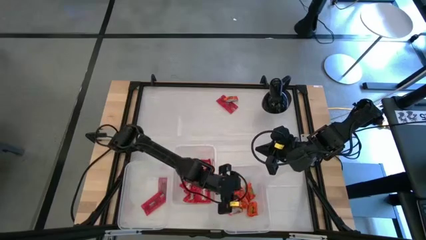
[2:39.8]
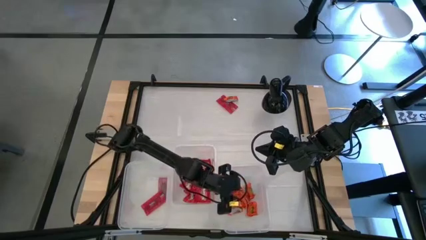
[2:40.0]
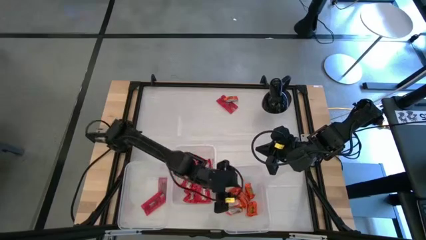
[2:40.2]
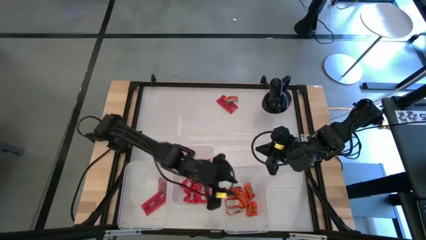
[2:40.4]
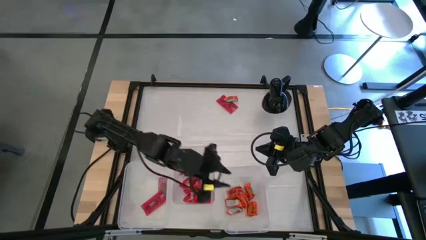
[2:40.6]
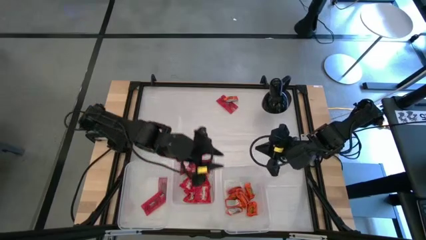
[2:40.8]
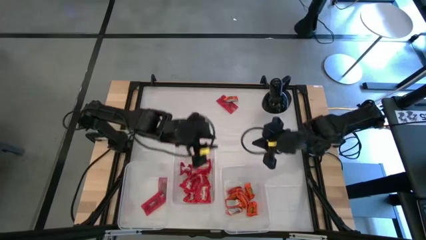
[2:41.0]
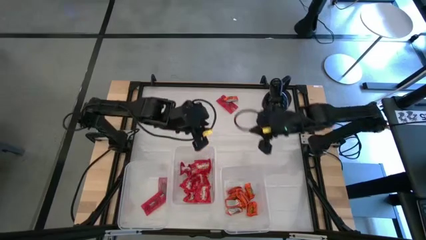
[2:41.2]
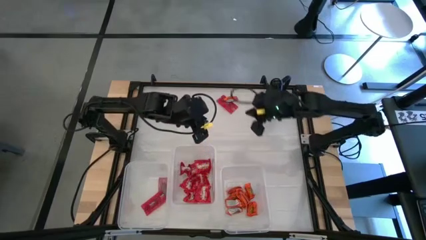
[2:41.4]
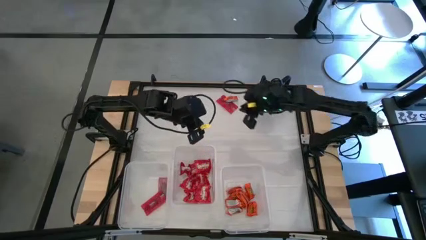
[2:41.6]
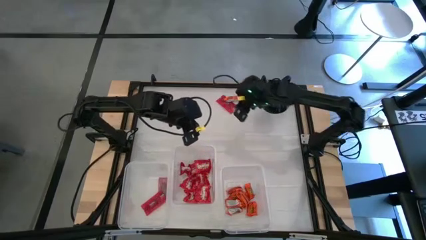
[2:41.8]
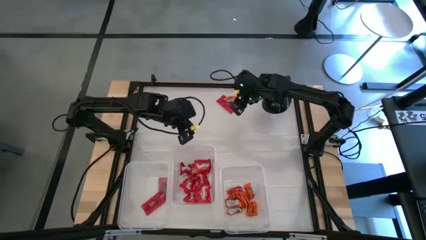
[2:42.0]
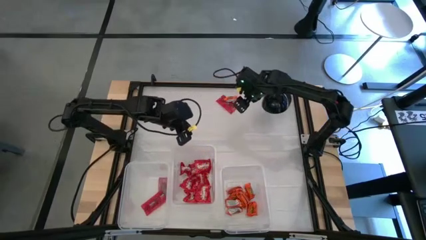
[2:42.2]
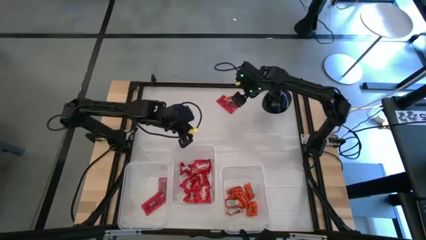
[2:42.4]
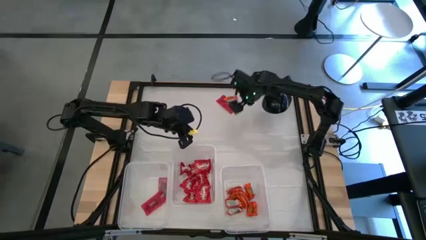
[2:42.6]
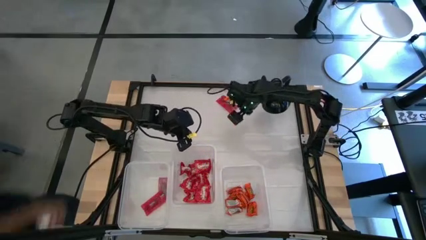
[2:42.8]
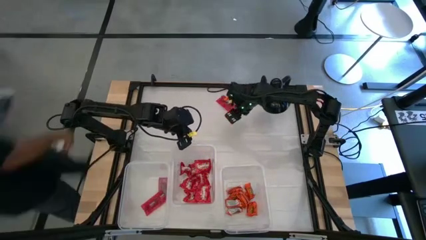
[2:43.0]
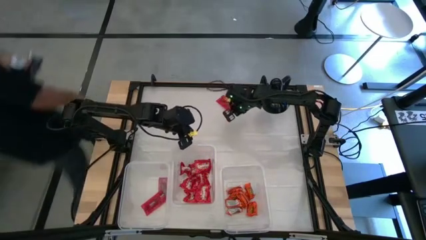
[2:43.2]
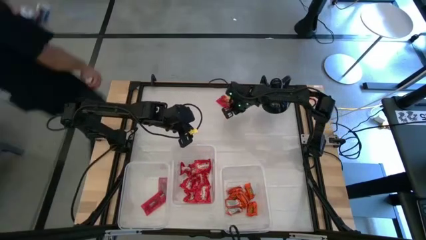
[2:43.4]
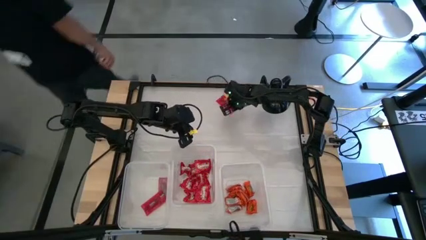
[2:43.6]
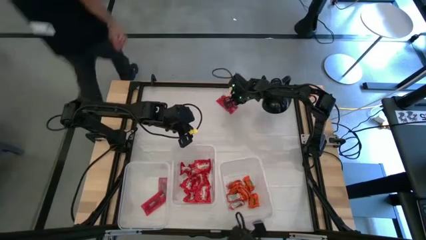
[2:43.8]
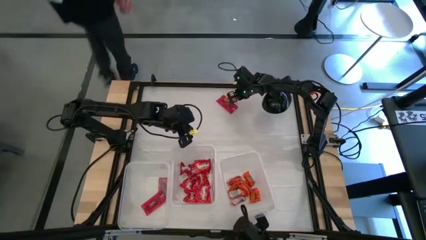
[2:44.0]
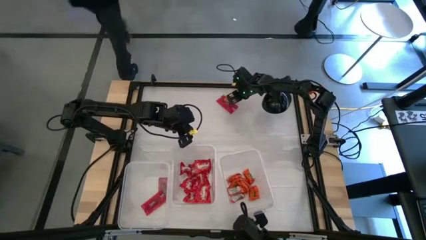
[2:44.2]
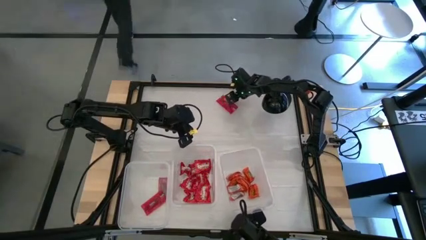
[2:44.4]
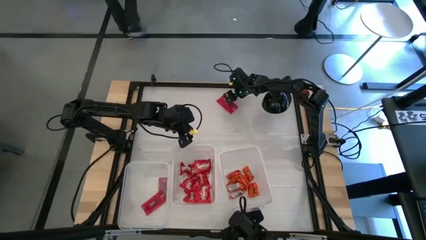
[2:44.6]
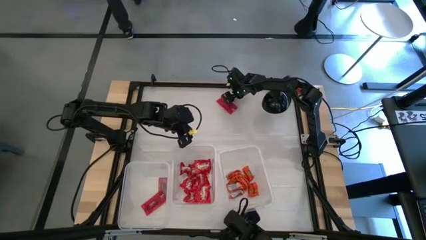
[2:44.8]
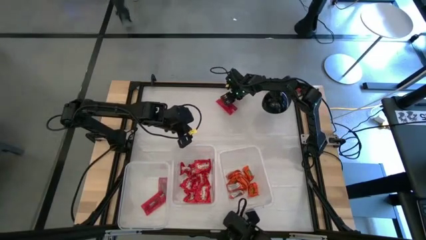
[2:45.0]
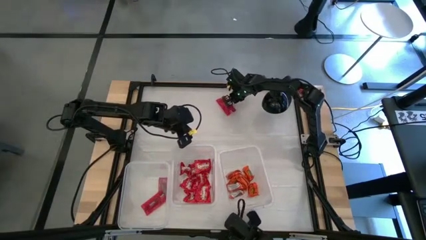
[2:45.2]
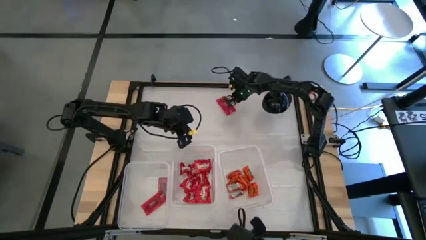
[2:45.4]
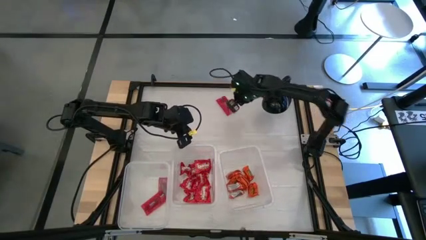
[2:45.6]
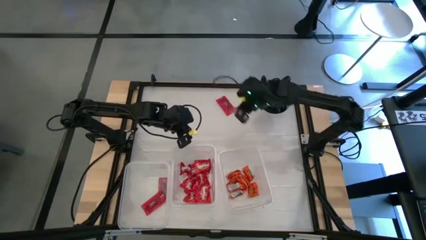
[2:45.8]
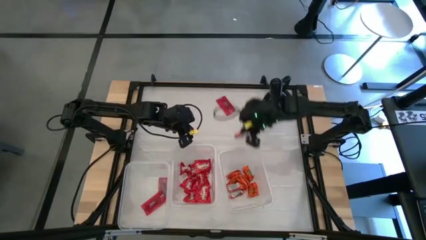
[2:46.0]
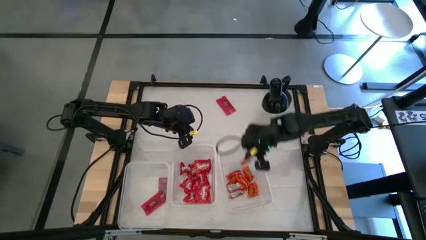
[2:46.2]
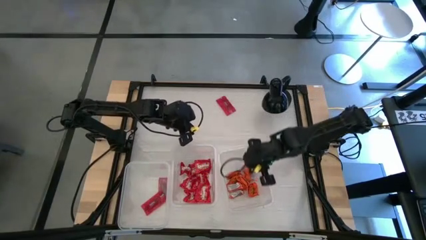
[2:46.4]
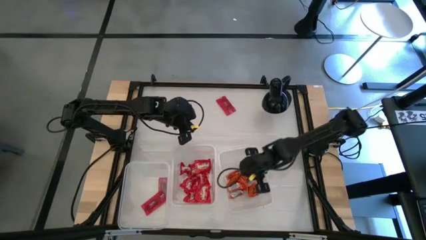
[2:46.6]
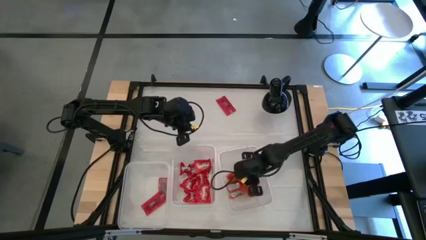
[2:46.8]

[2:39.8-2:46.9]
Task: Sort candy
Put the orange candy into the right transparent bin

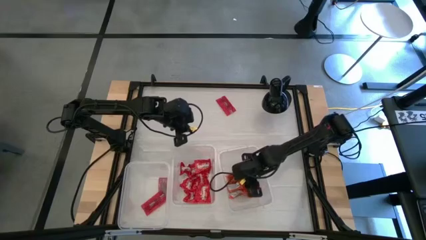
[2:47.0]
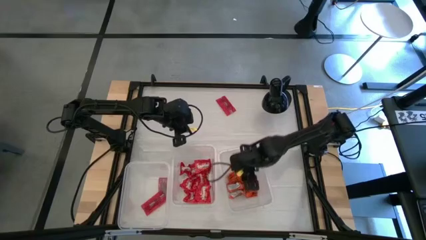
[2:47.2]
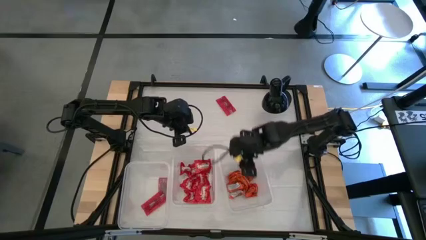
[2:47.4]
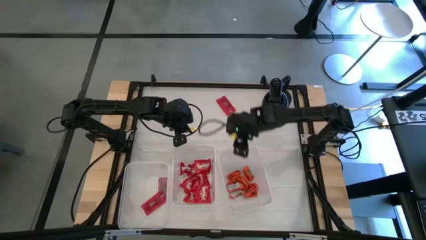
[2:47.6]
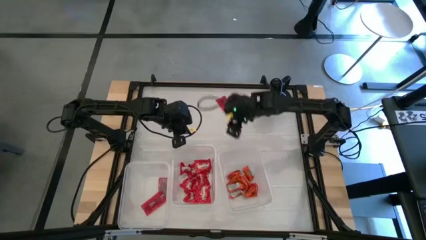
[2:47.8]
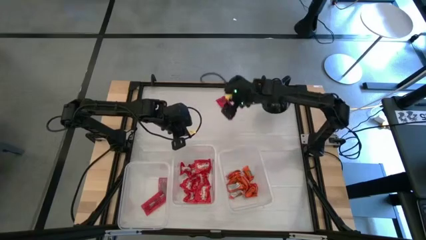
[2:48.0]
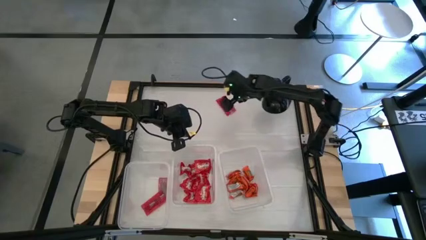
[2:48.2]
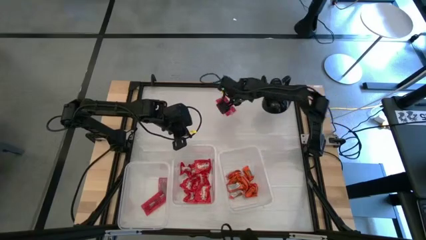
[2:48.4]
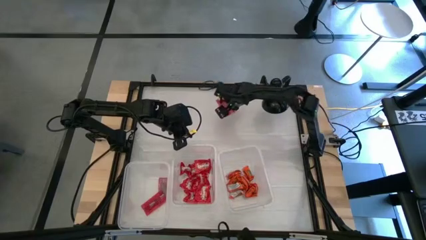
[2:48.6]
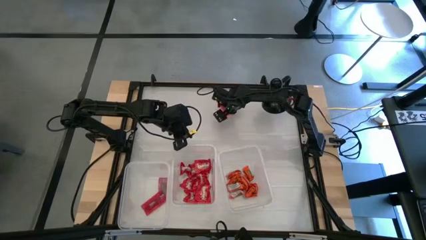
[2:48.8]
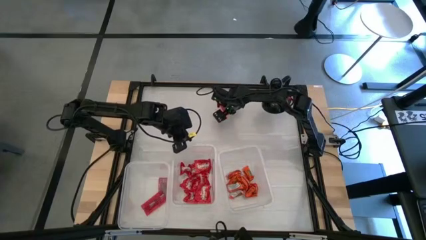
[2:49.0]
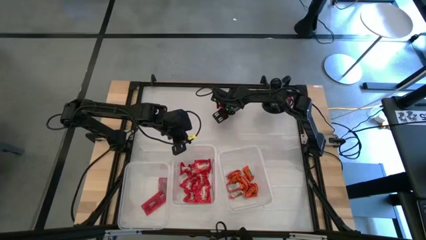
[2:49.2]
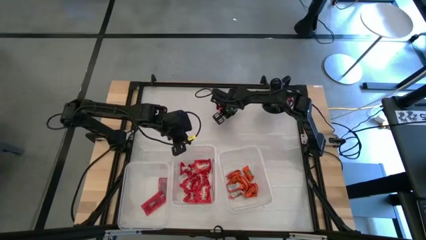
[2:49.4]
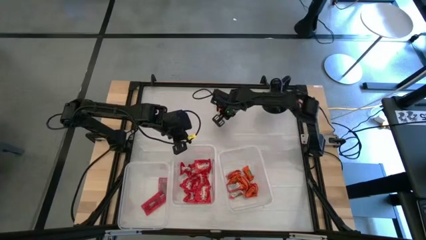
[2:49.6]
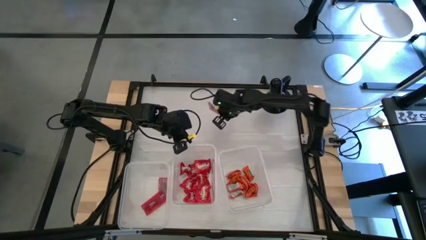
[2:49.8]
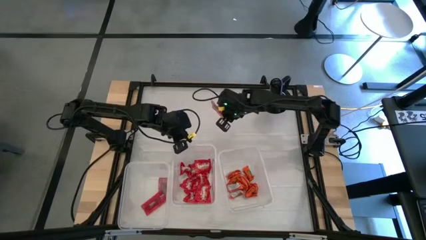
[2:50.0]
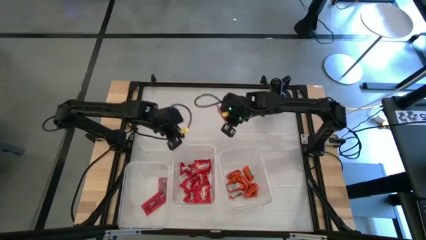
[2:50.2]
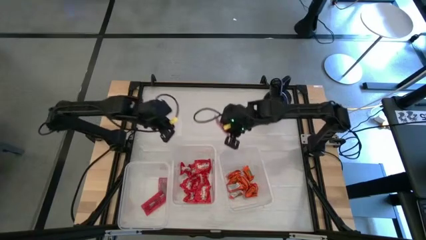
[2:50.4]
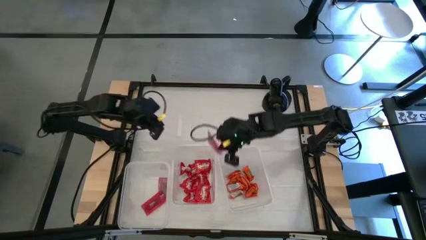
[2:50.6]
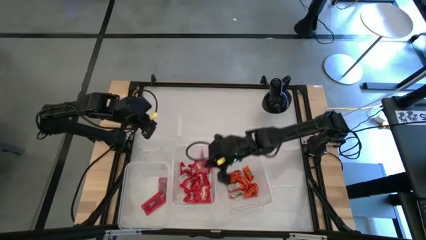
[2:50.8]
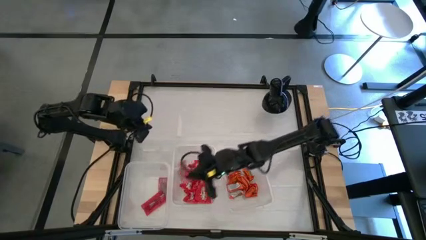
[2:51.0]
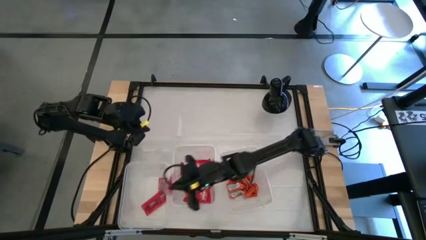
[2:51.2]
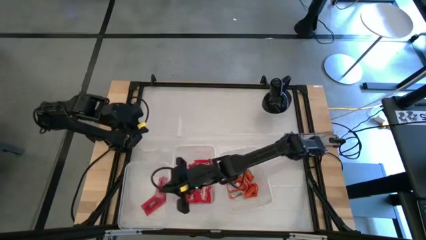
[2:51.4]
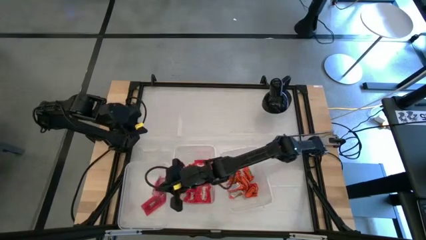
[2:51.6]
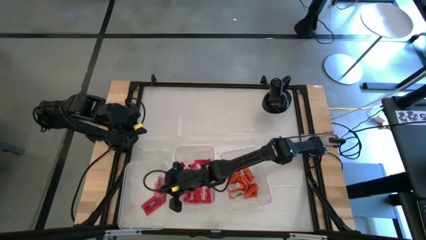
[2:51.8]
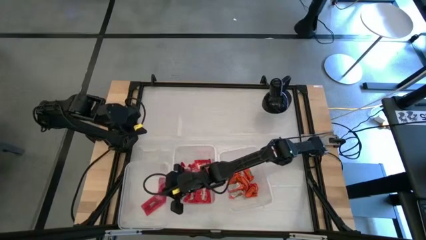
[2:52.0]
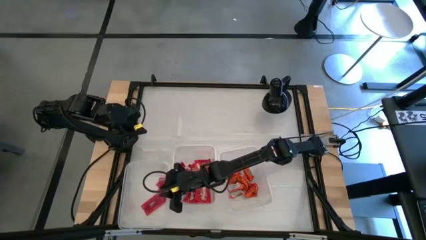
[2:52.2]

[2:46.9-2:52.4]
Put the light red candy into the left transparent bin

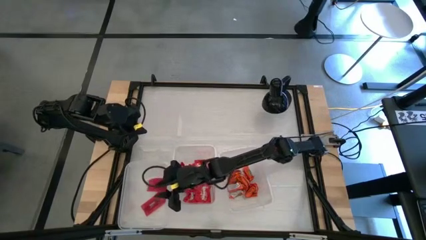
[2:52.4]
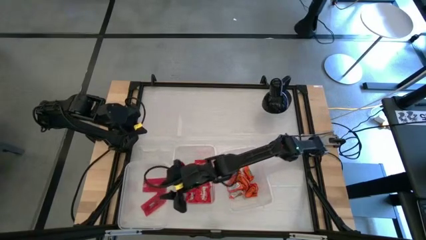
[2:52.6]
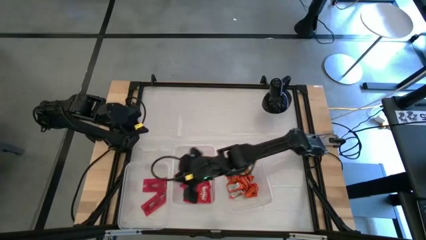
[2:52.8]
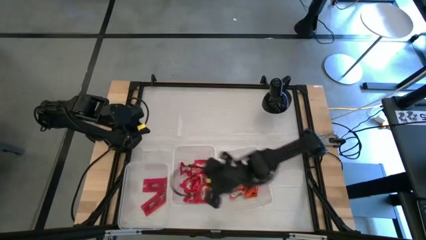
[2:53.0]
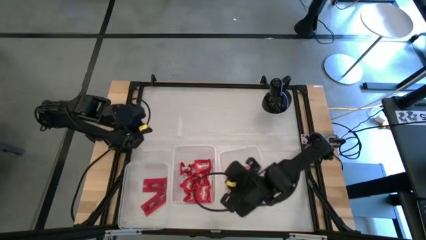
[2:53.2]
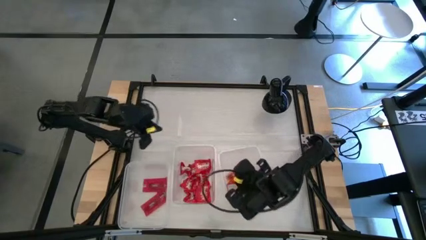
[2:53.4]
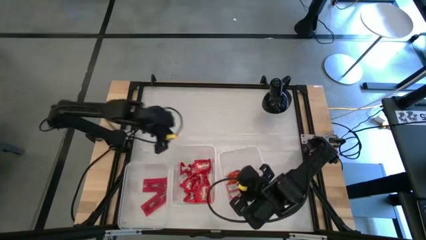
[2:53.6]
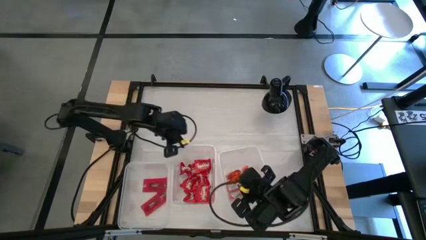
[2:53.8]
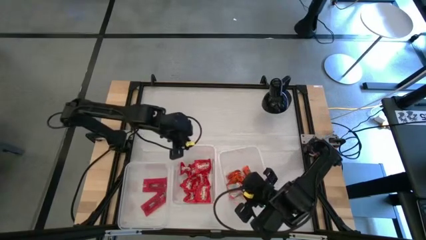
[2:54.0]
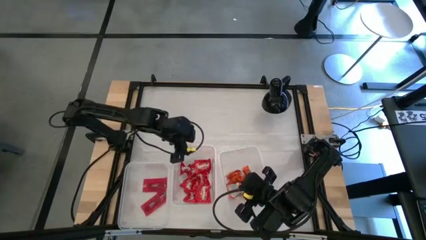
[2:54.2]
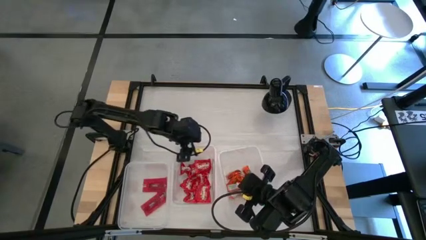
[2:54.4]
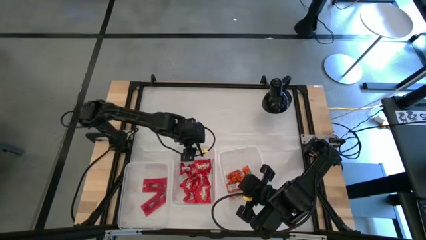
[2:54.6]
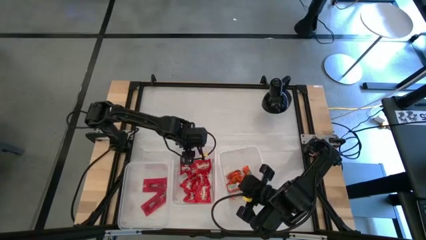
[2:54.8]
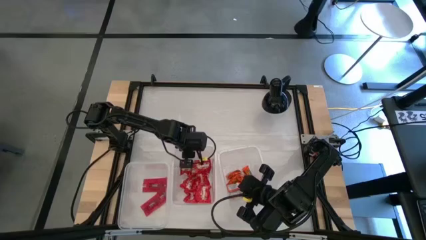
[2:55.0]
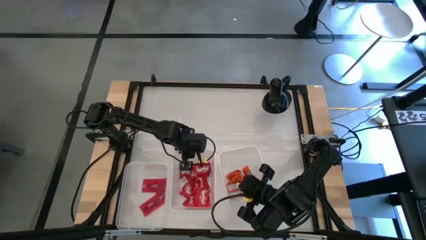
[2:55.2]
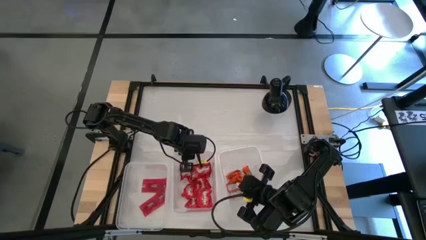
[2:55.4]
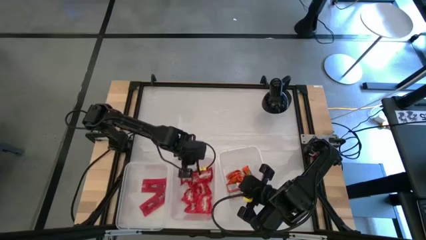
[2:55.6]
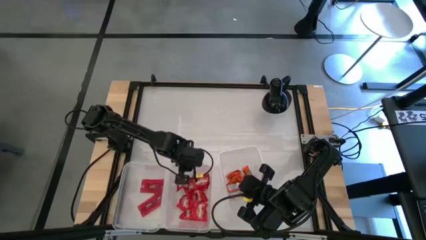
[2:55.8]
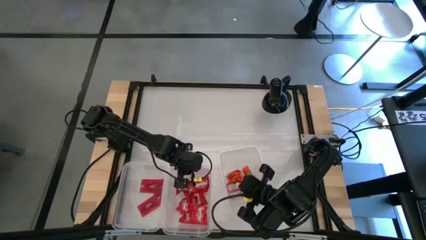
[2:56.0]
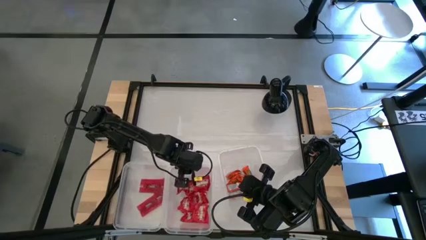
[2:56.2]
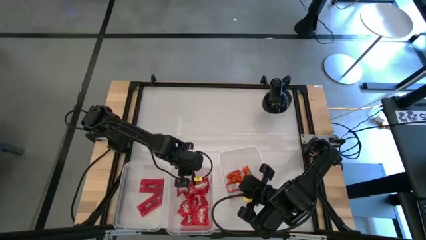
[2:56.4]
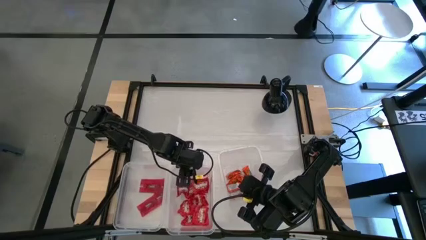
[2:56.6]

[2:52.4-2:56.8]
Adjust the middle transparent bin
